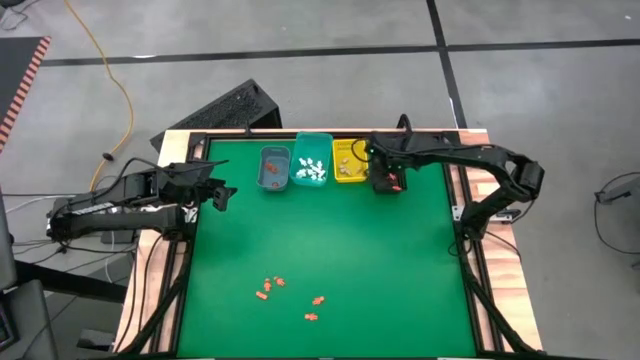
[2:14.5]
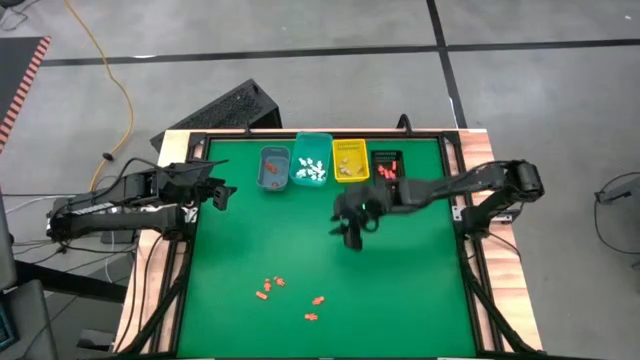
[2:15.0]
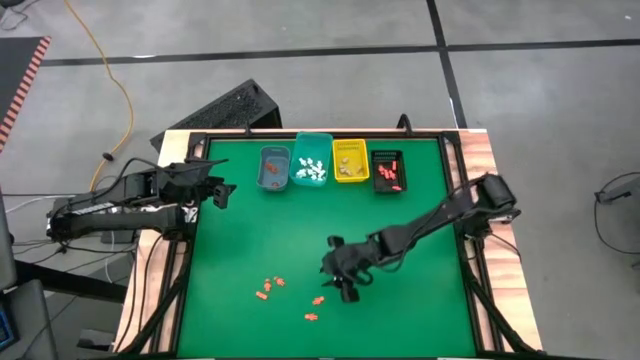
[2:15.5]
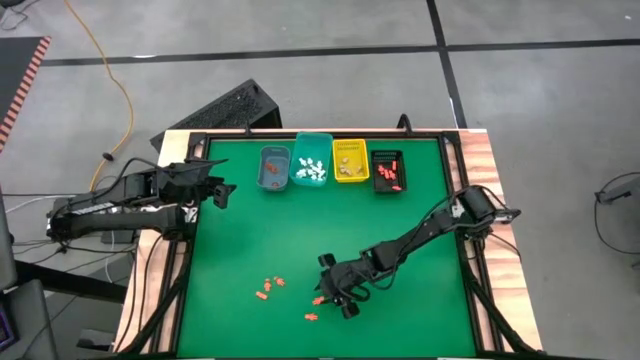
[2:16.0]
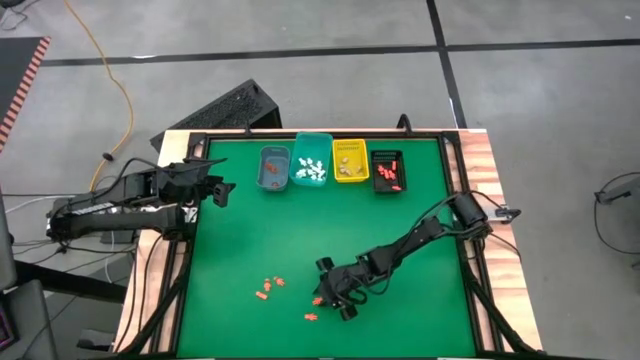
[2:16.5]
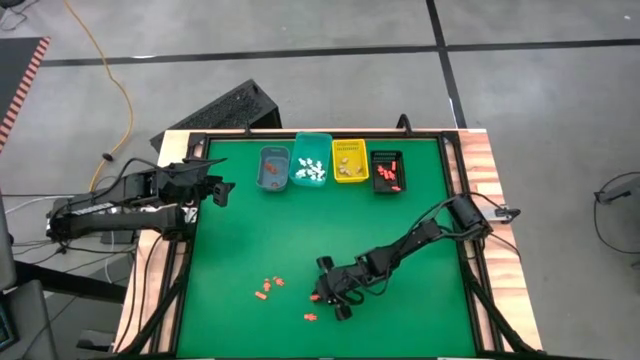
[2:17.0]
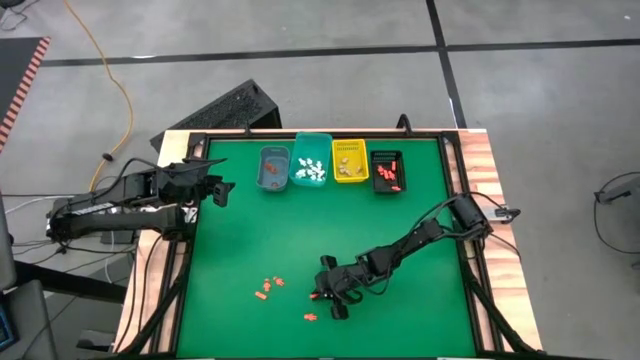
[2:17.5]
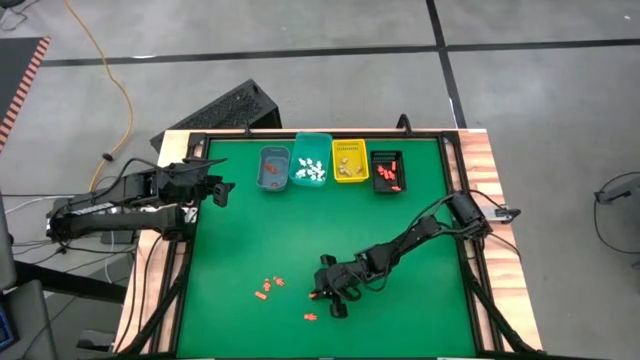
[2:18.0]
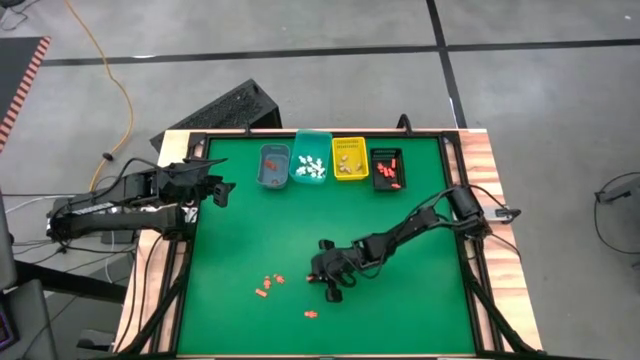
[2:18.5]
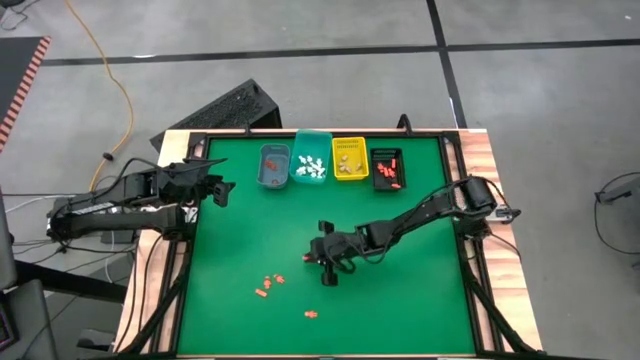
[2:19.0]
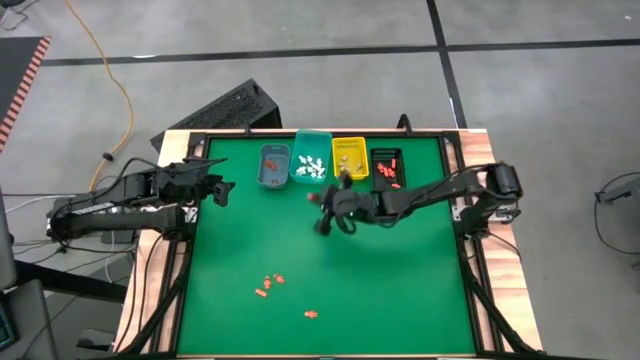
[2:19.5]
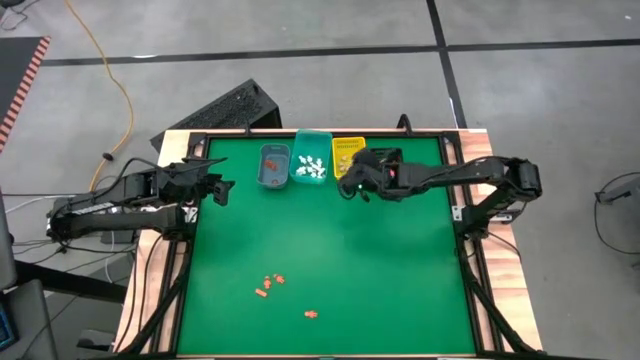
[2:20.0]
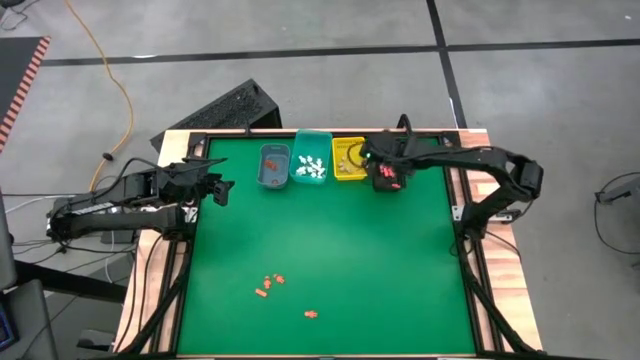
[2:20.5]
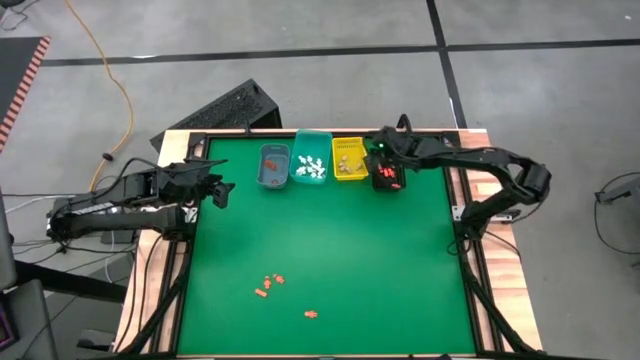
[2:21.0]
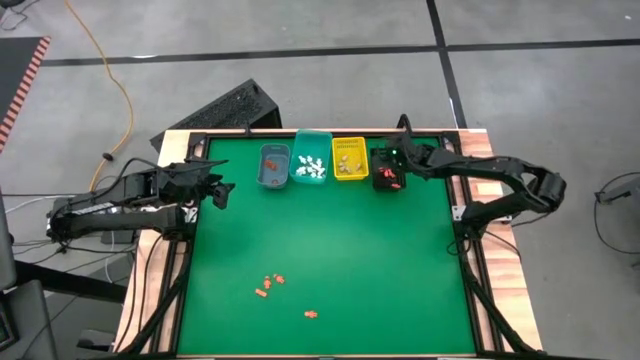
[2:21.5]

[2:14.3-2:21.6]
Task: Sort Halloween decoration
Put the orange skeleton toy into the black bin

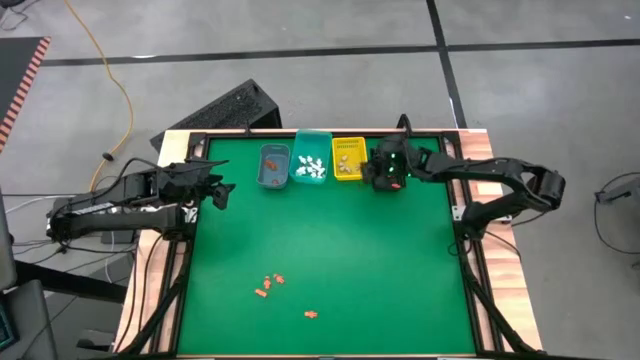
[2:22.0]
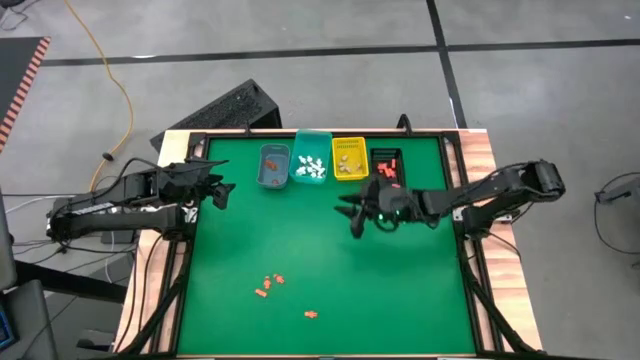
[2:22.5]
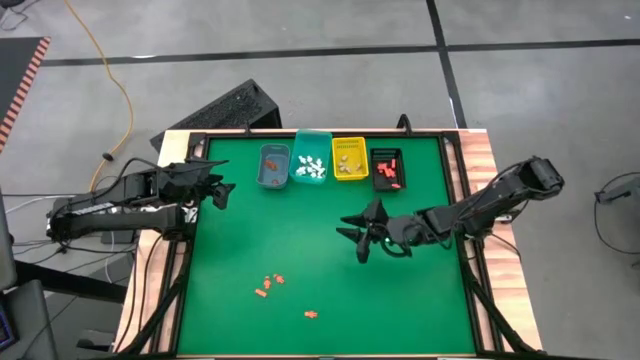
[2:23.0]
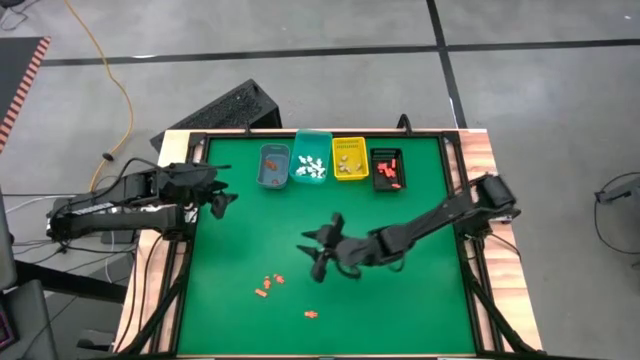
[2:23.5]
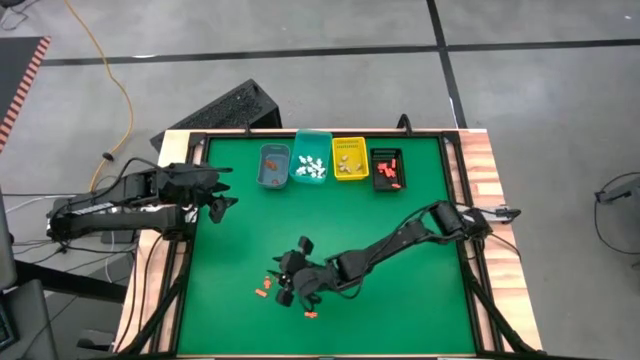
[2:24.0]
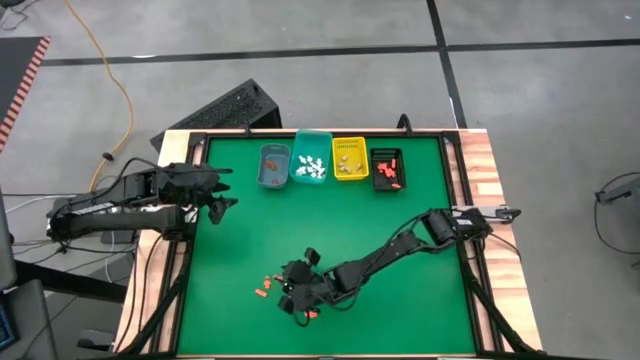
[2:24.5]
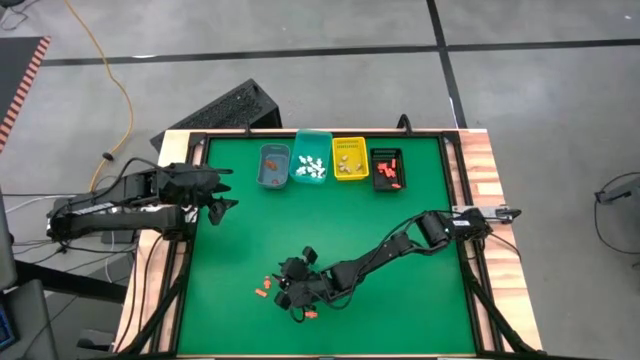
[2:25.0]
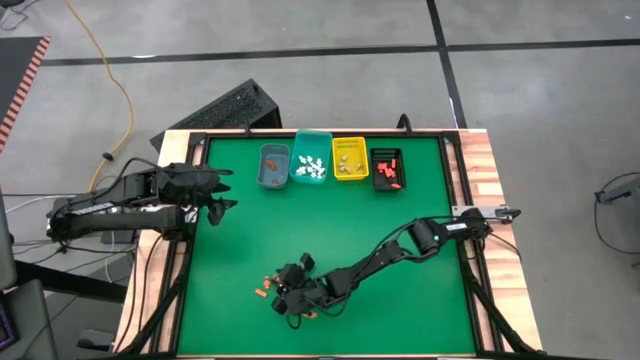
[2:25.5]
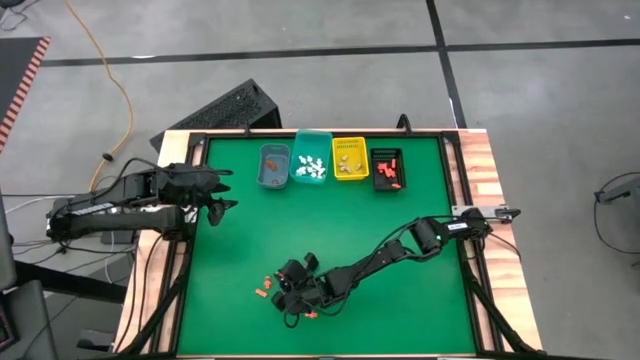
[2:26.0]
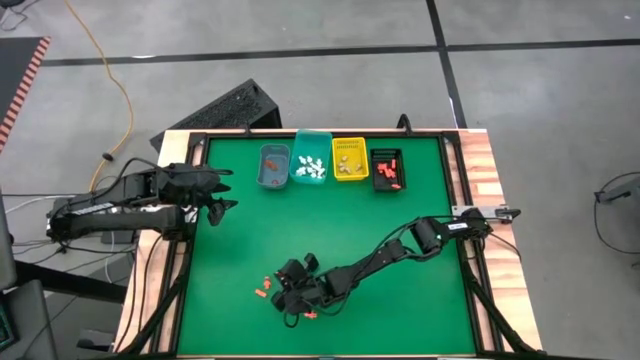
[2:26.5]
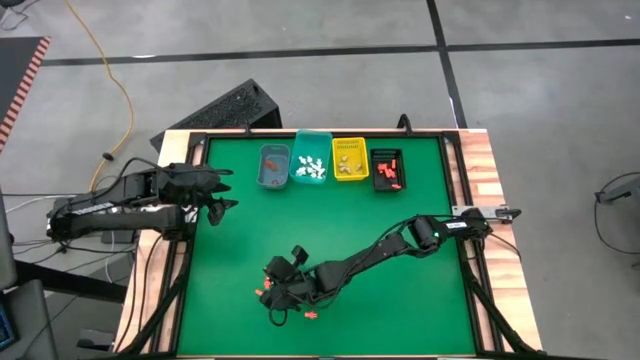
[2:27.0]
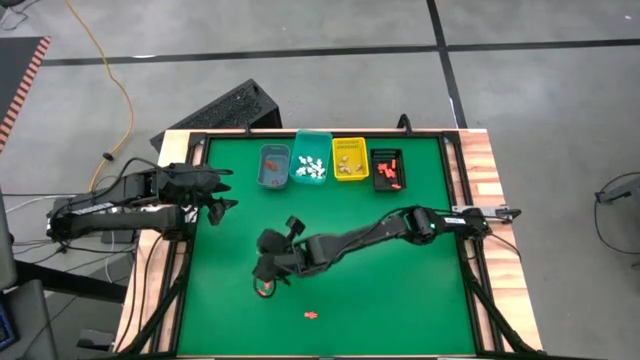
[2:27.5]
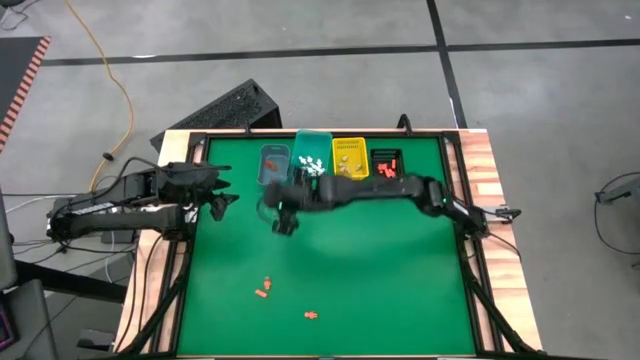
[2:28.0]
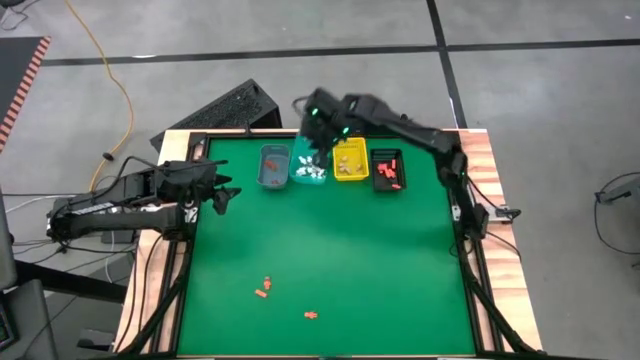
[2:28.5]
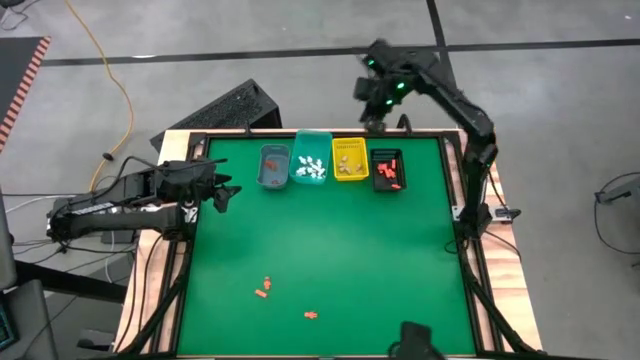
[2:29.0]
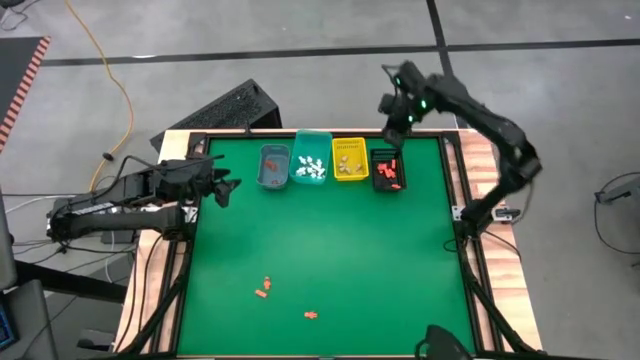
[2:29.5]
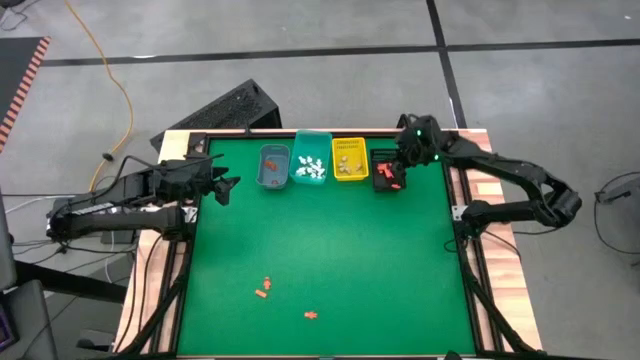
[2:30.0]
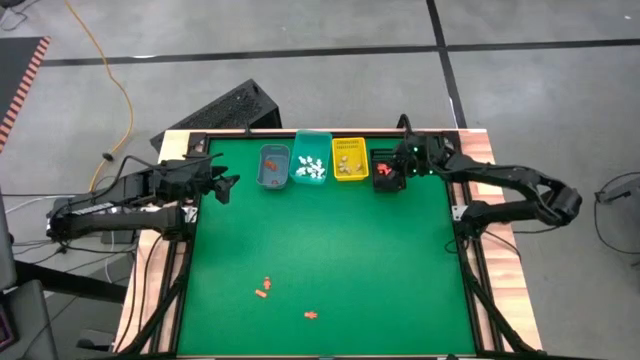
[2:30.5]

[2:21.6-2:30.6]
Put the orange skeleton toy into the black bin

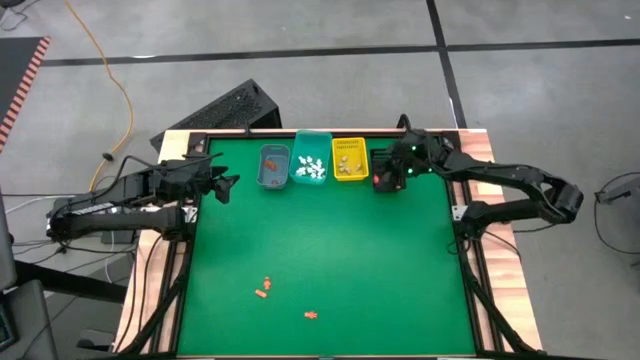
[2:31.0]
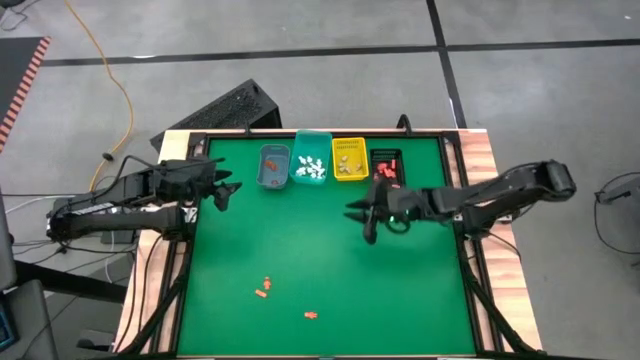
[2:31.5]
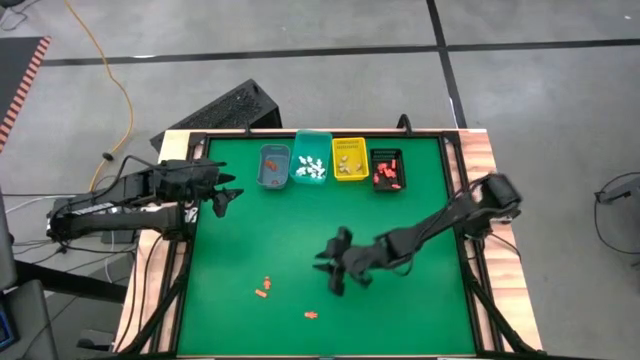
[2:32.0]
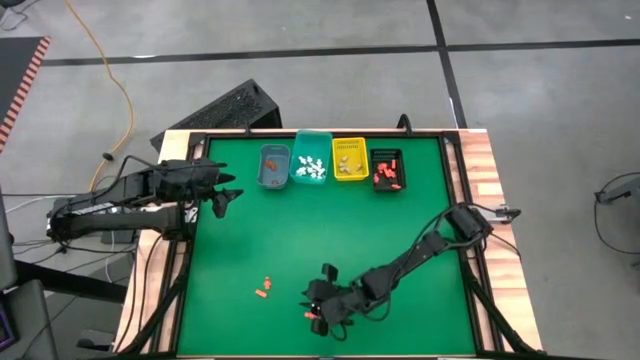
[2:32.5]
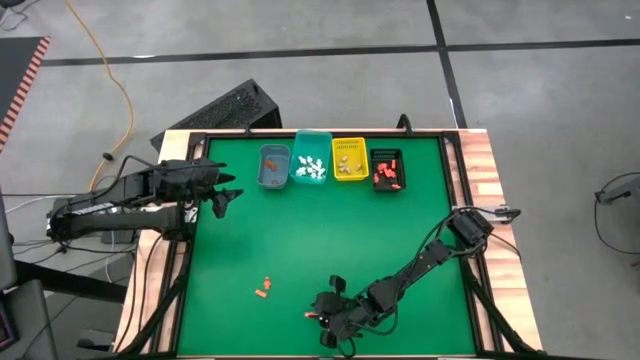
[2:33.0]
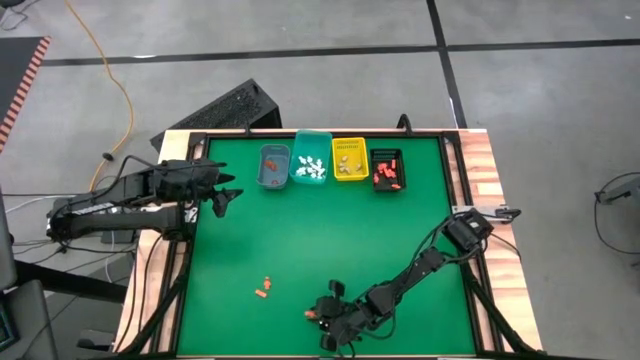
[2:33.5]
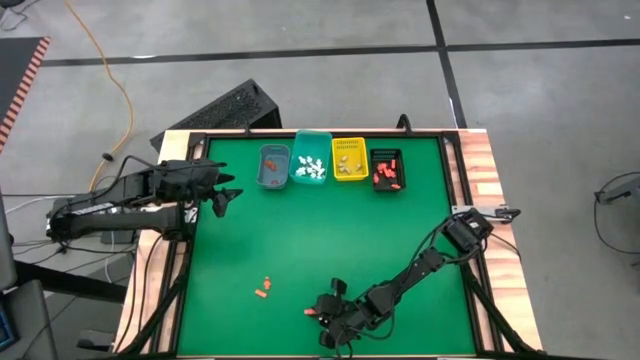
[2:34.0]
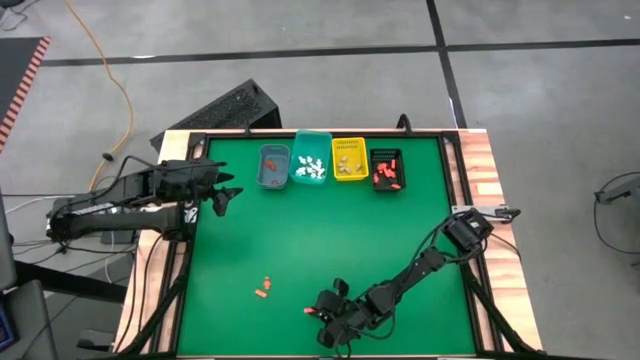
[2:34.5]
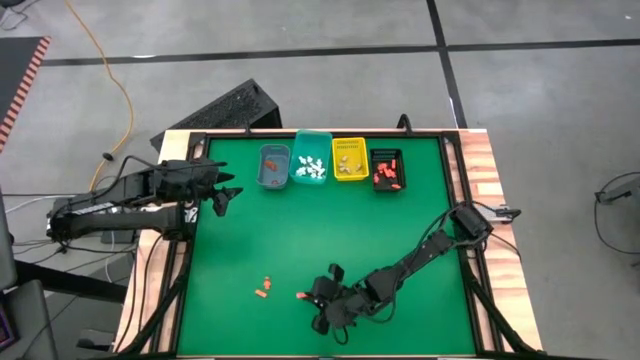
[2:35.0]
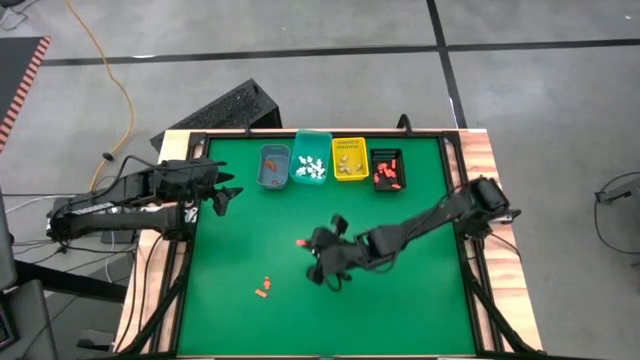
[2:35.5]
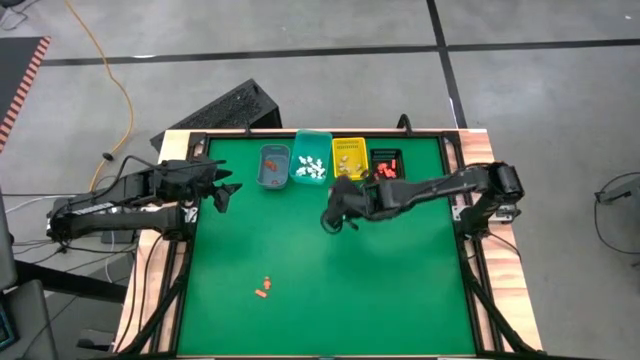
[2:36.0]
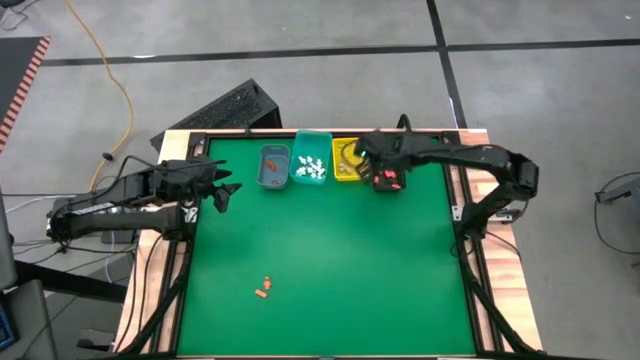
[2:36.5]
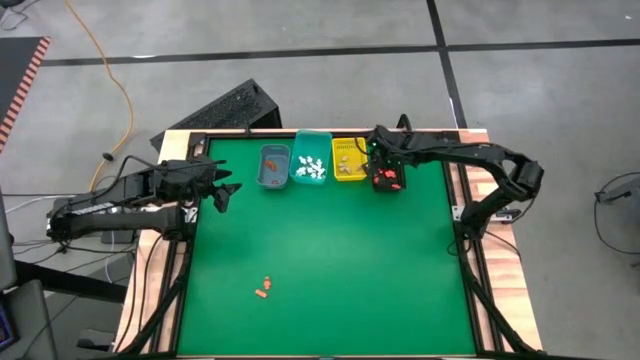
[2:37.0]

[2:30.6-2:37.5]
Put the orange skeleton toy into the black bin
